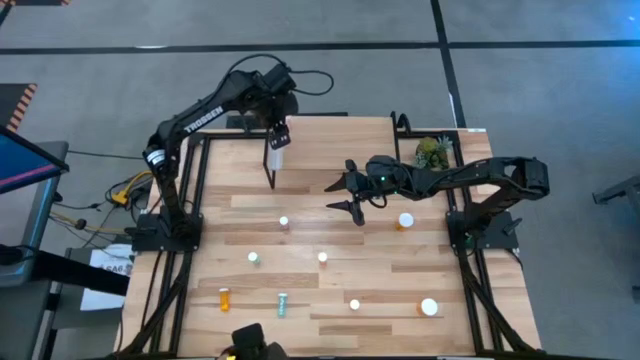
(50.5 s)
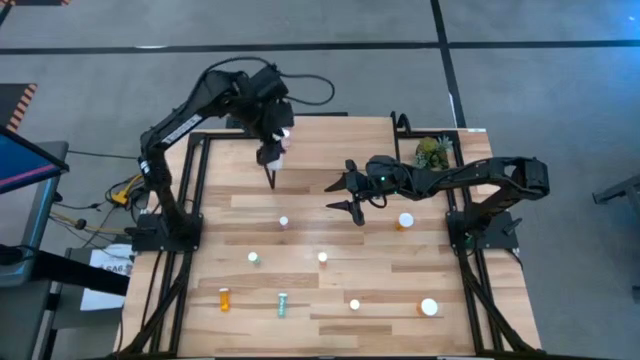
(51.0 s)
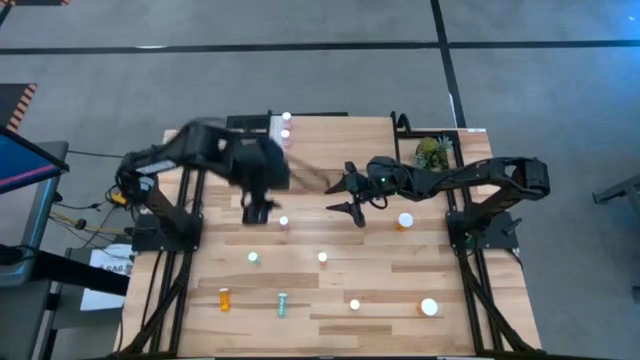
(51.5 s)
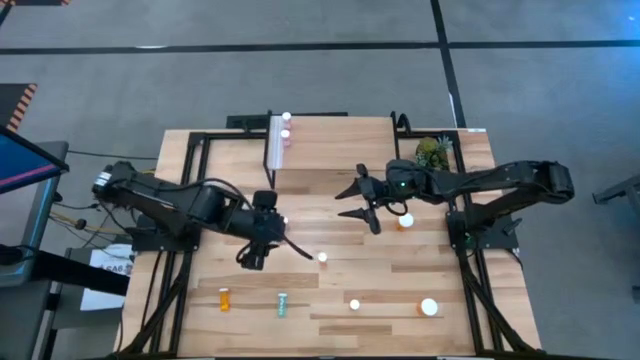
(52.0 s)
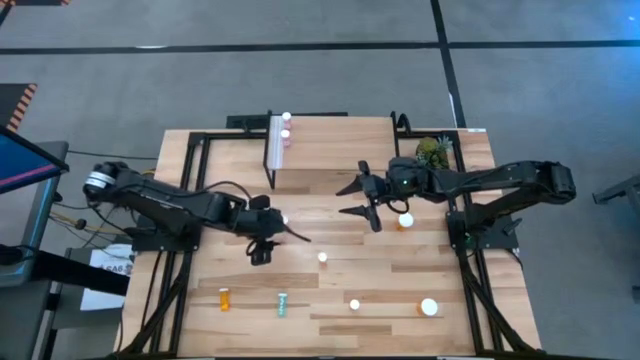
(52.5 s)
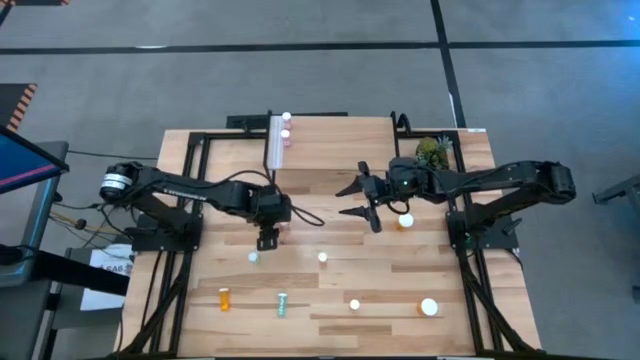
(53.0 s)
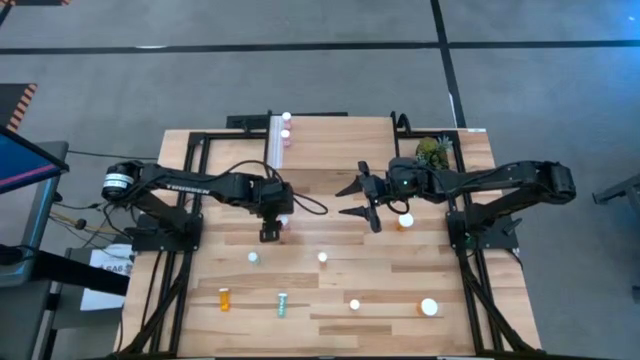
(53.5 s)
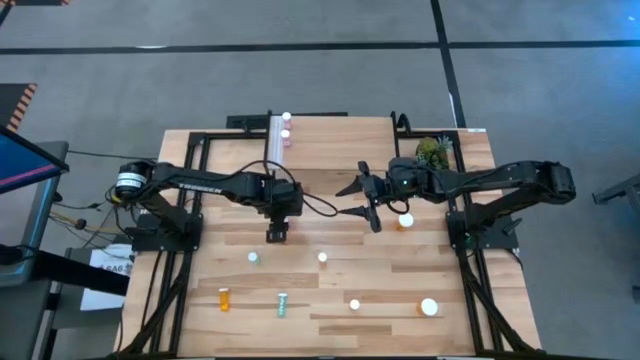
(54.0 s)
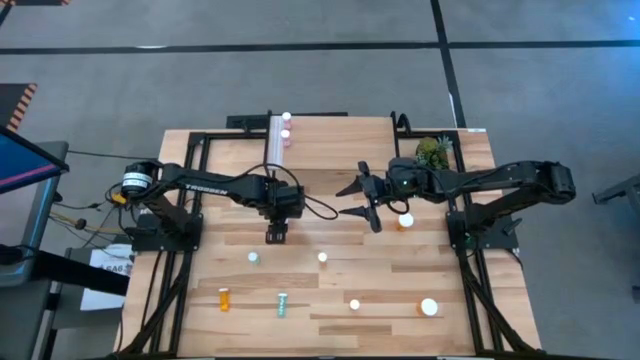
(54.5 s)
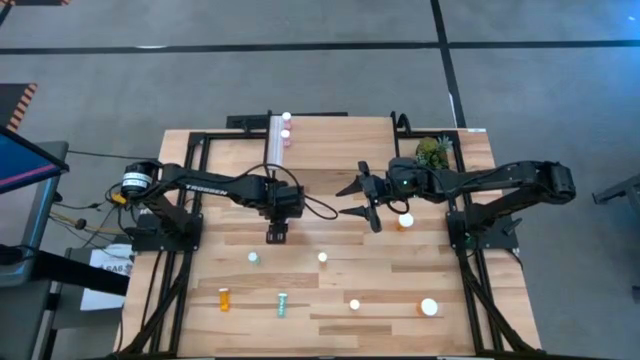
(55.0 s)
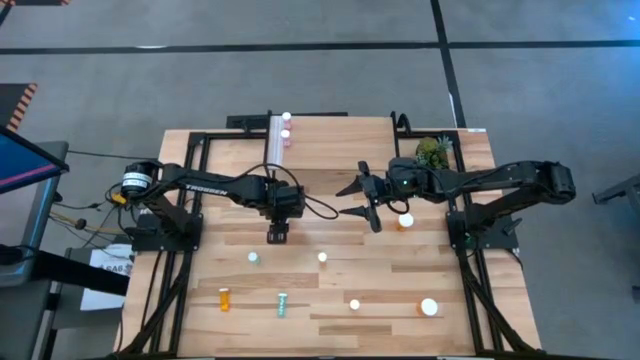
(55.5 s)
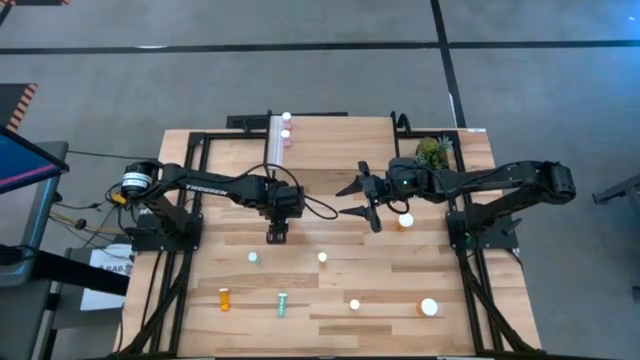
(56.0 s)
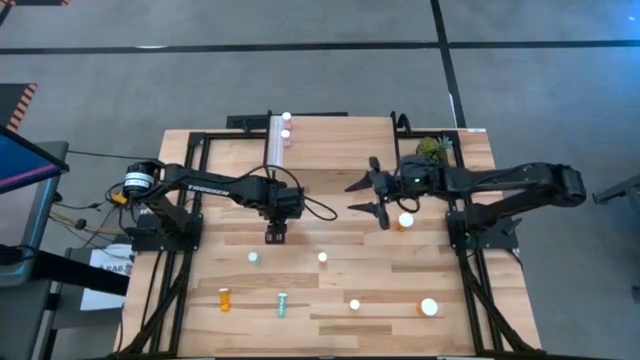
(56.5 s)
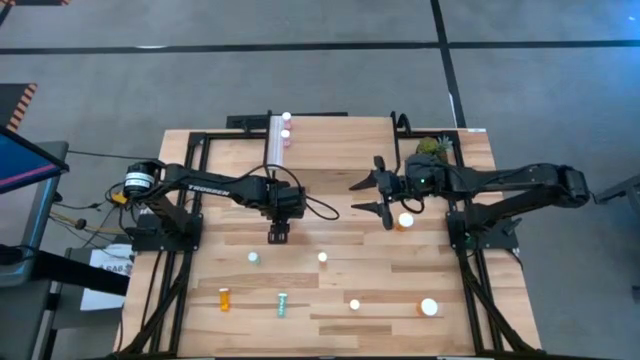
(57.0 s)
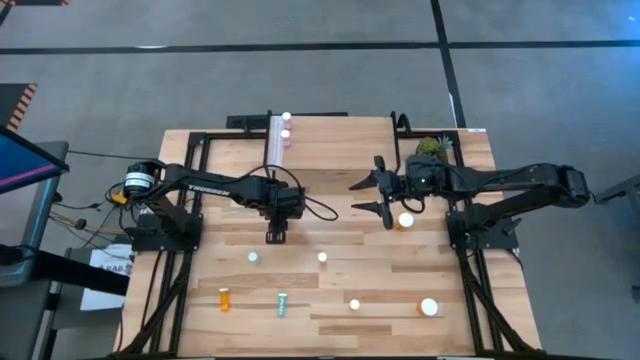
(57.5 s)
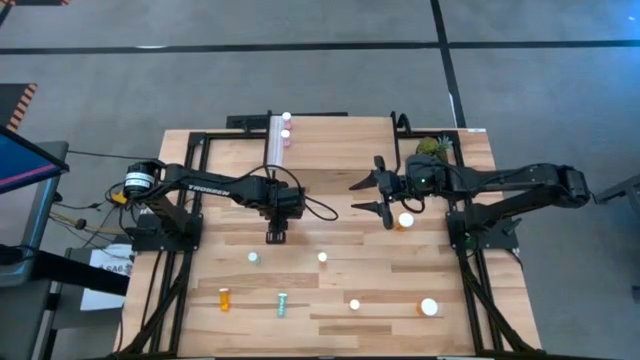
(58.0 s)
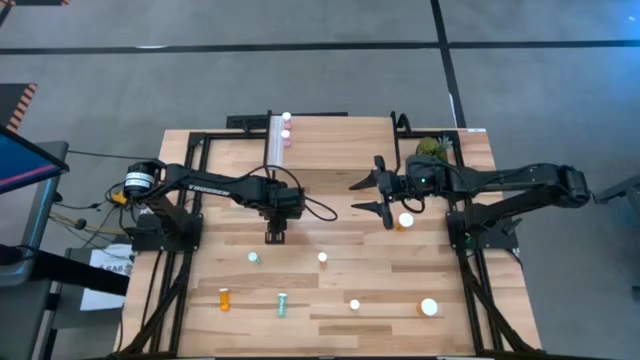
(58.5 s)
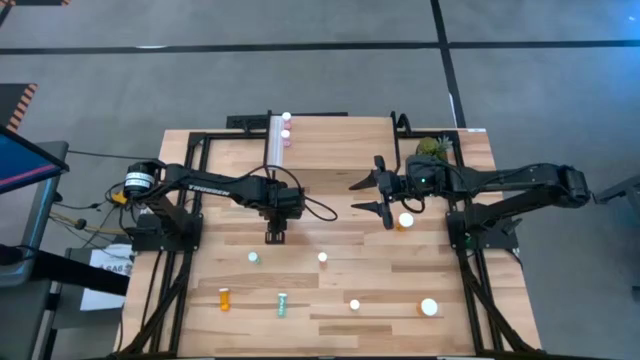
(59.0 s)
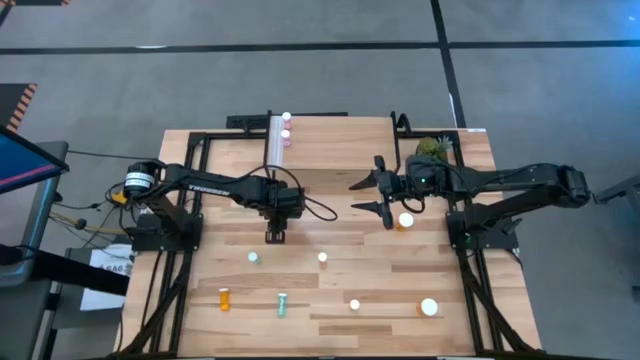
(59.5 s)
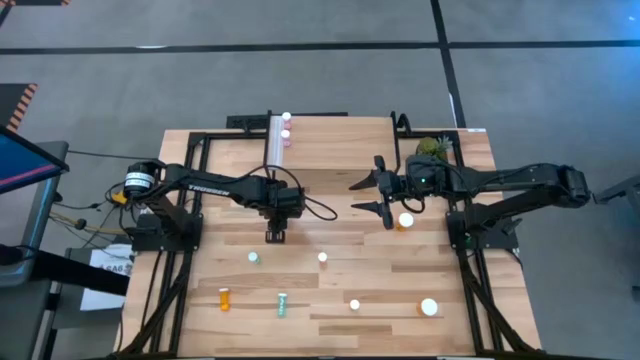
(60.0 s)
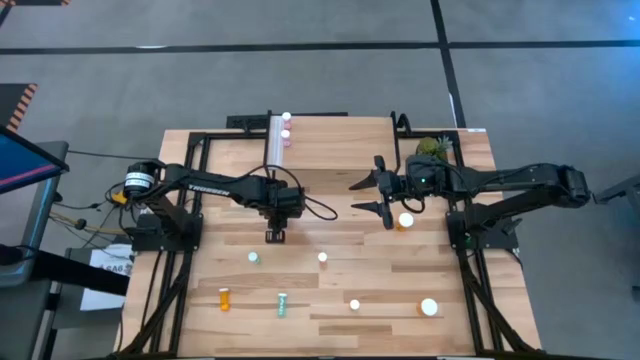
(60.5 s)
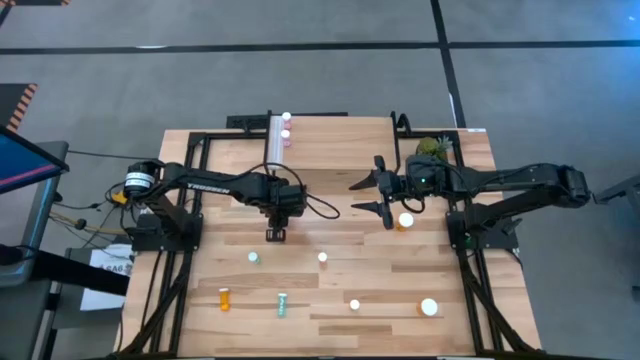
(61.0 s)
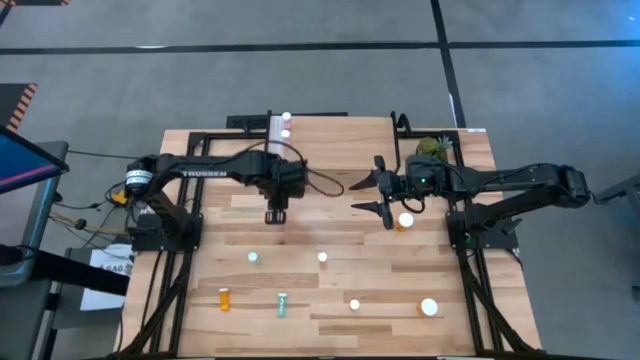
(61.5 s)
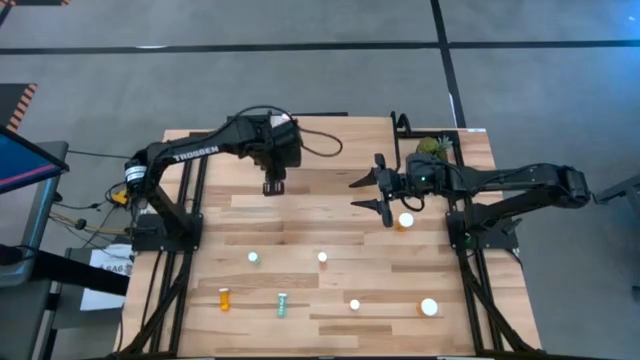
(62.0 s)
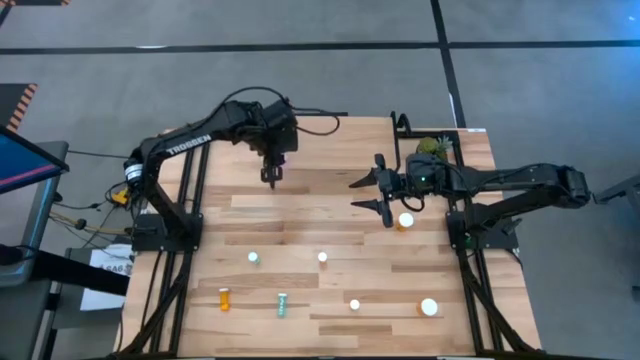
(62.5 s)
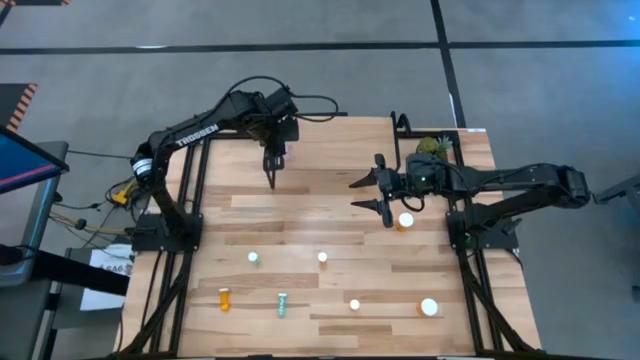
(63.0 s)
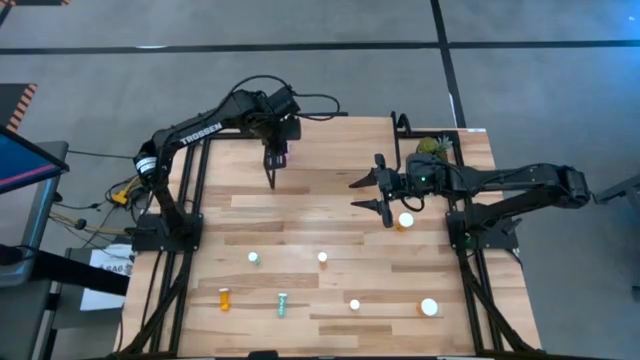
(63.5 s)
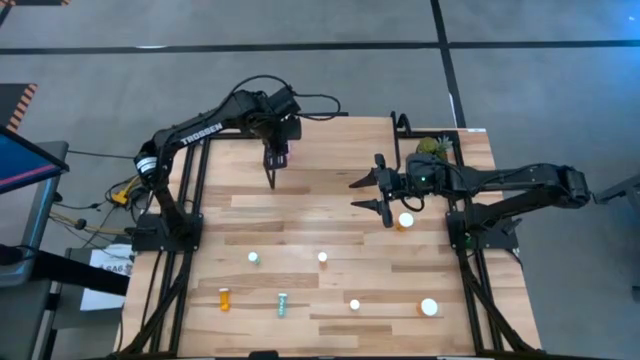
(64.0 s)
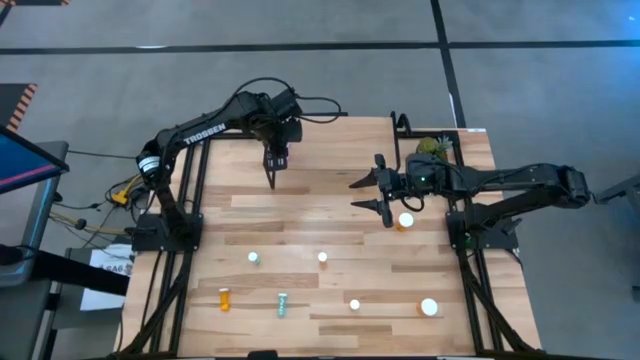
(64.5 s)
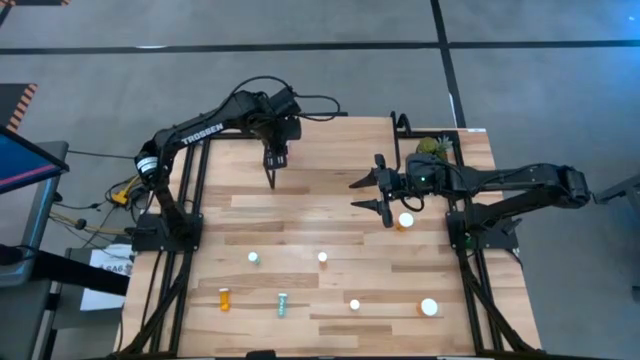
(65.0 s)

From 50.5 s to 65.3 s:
Task: Pick and place medicine bottles onto shelf by color
Put the pink pill bottle on the shelf aligned with the other pink pill bottles

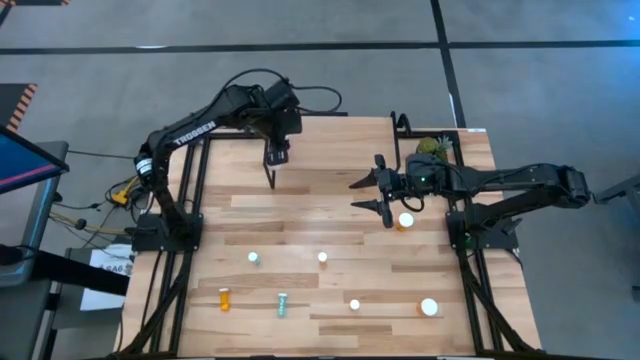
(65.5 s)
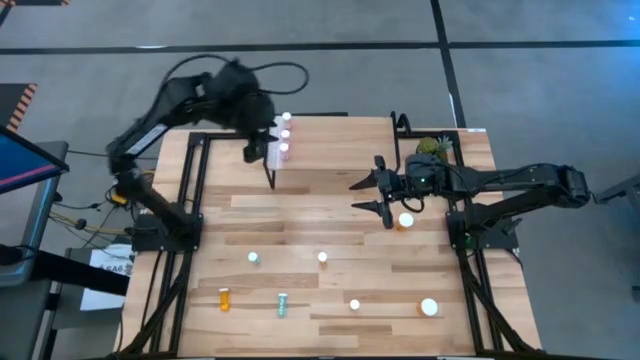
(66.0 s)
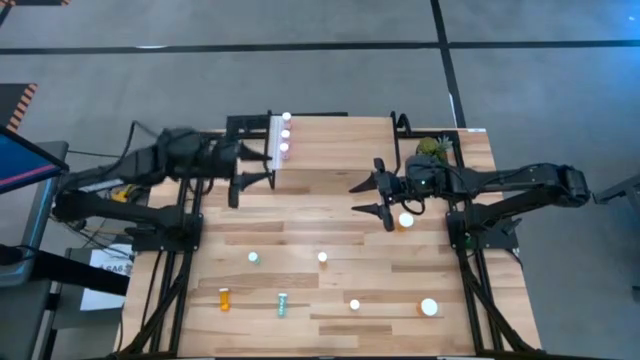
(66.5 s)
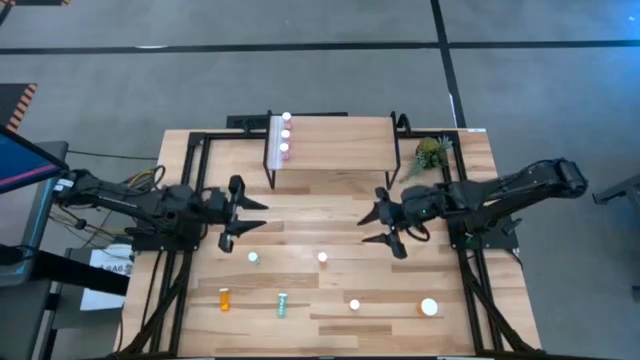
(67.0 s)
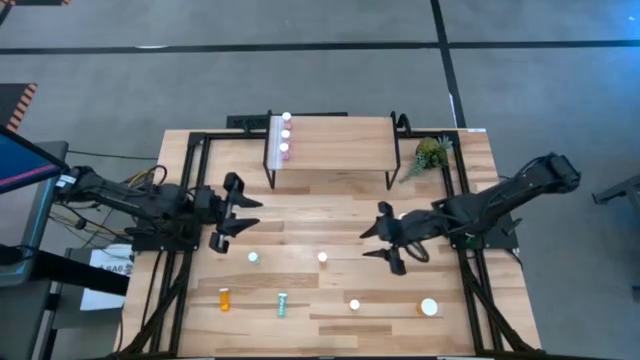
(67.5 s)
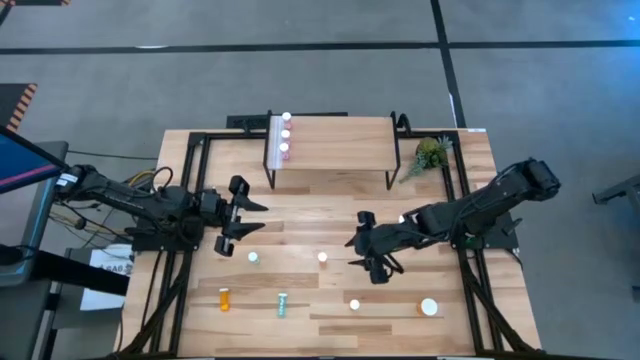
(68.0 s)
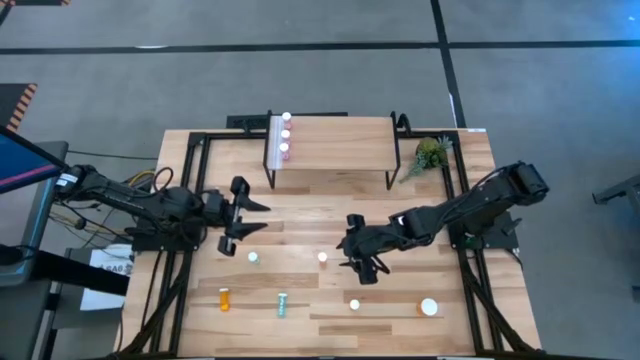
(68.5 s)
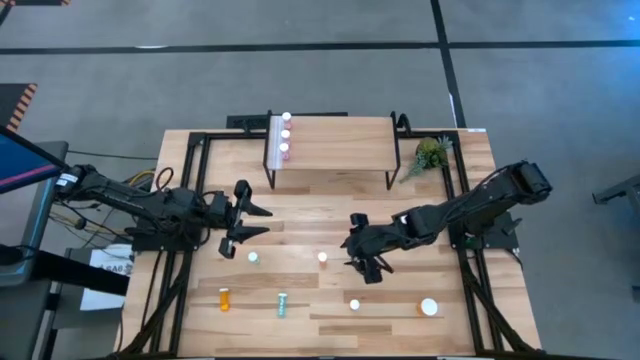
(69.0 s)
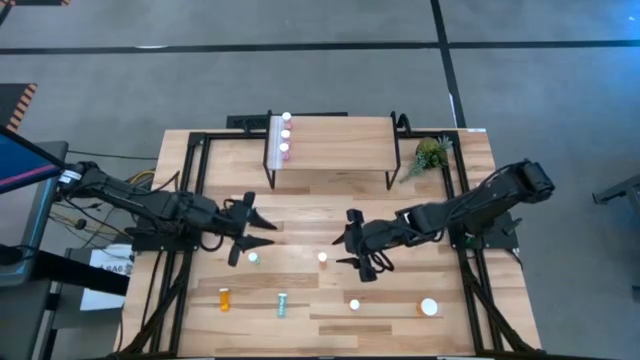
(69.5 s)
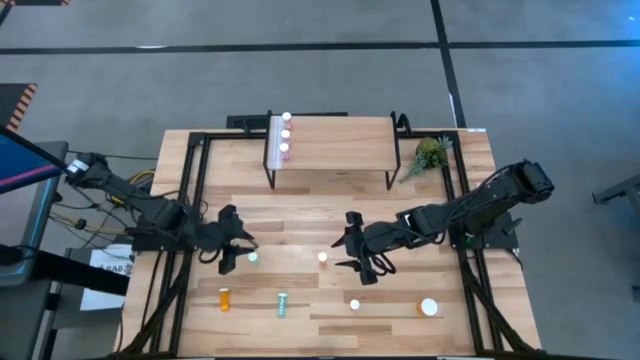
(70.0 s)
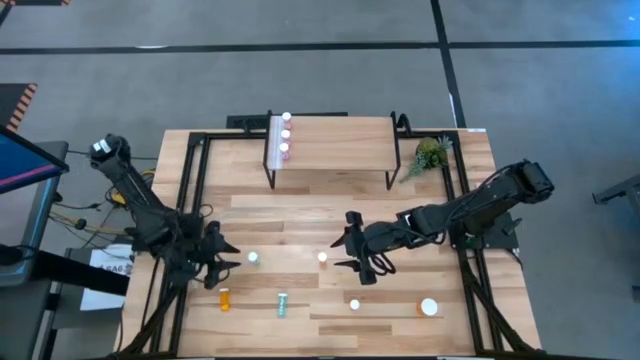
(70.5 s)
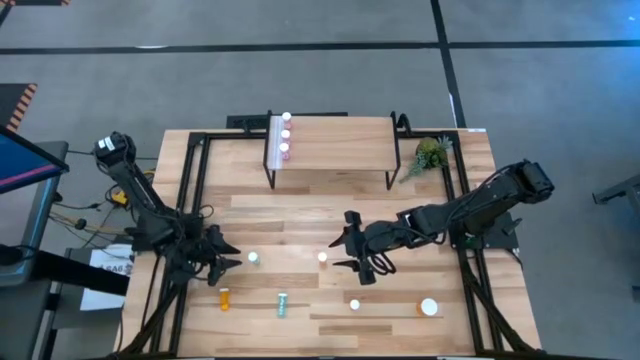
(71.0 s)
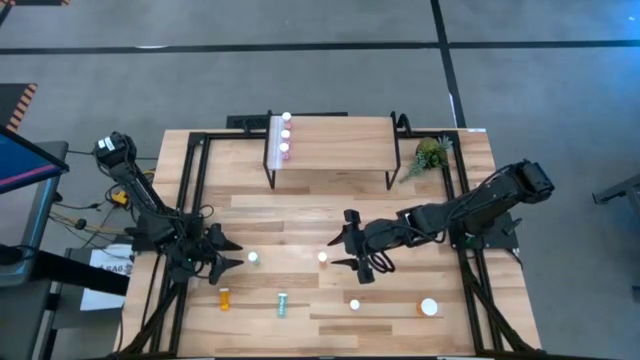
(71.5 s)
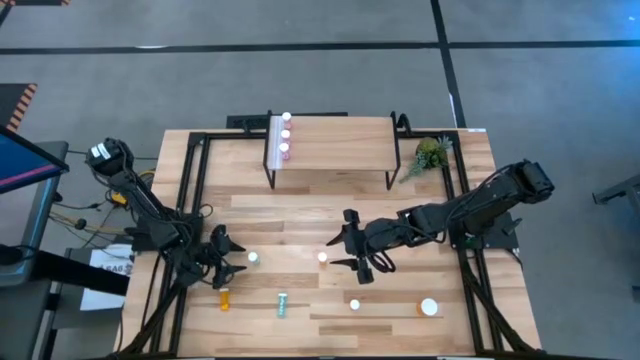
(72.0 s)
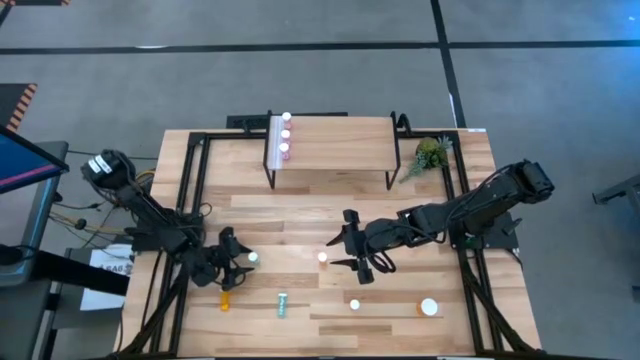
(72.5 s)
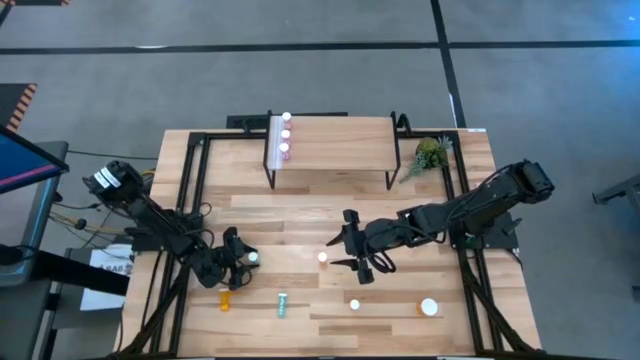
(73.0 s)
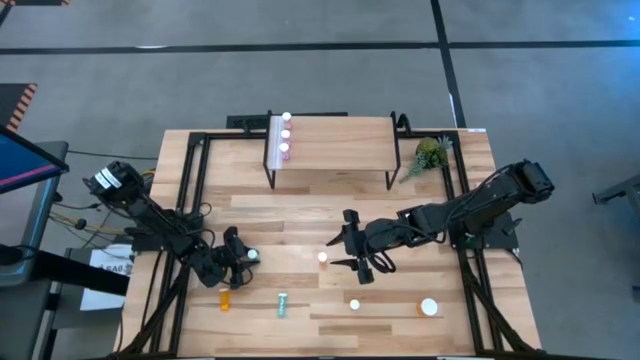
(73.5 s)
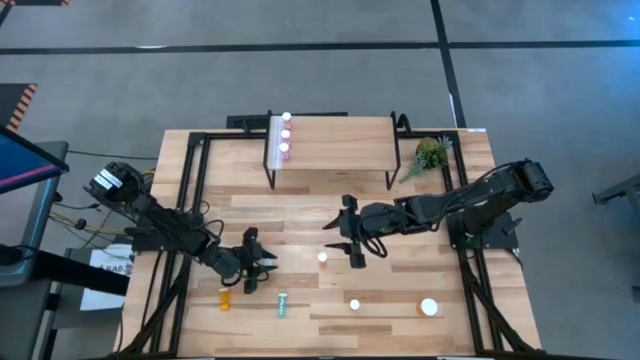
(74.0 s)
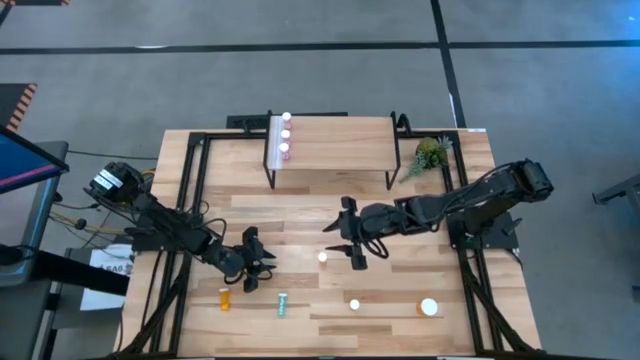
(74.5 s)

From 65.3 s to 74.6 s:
Put the top green pill bottle on the shelf
